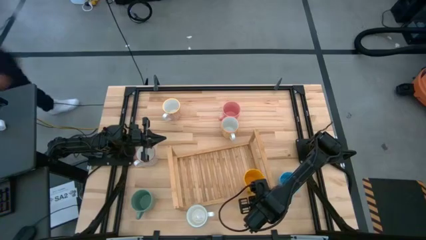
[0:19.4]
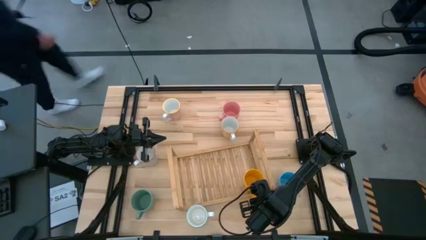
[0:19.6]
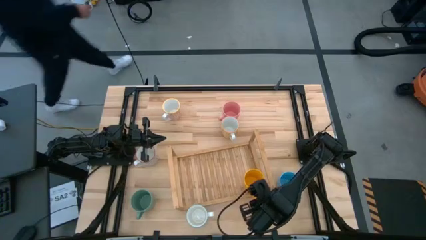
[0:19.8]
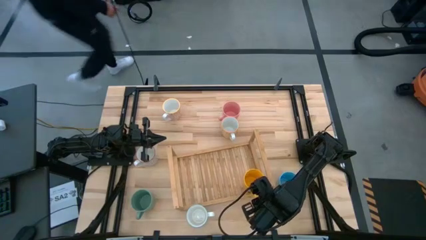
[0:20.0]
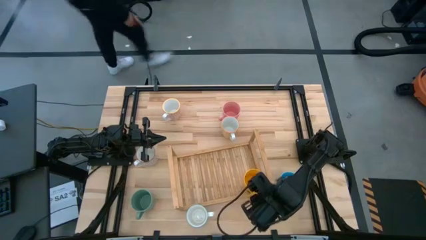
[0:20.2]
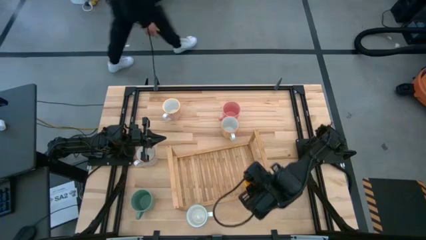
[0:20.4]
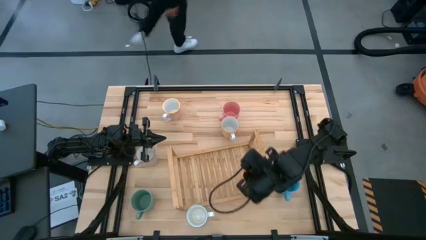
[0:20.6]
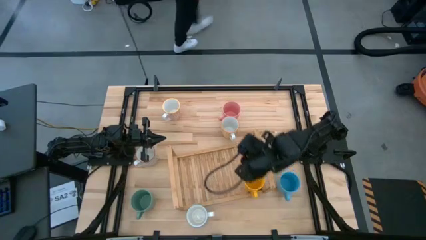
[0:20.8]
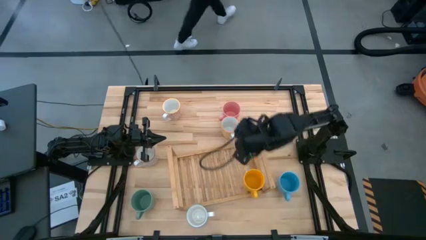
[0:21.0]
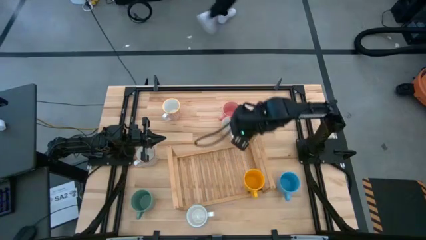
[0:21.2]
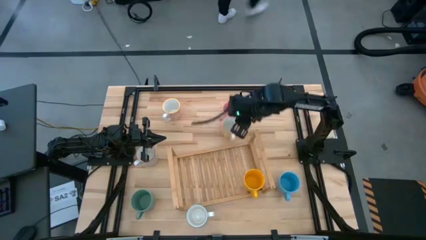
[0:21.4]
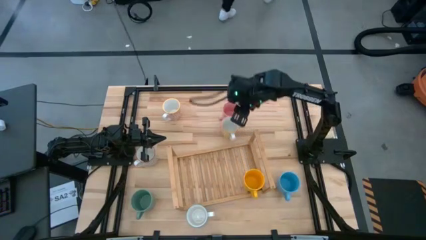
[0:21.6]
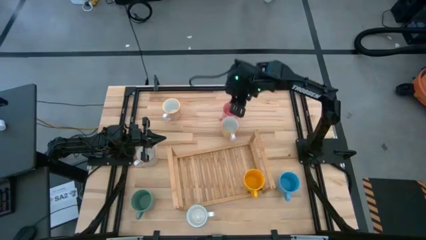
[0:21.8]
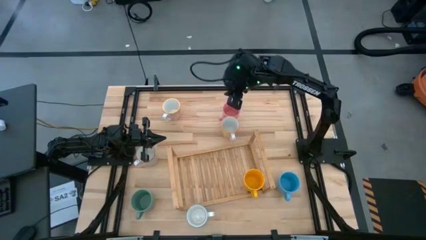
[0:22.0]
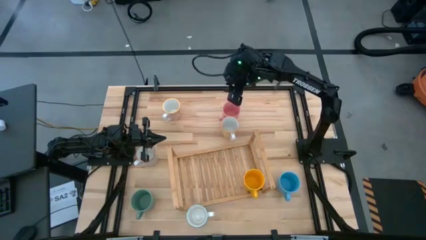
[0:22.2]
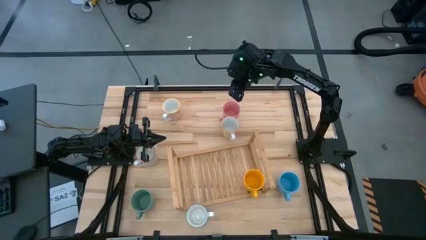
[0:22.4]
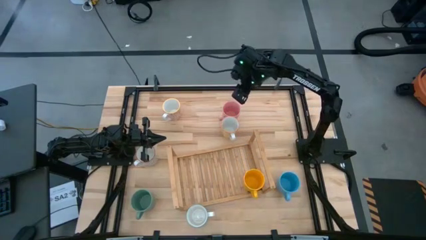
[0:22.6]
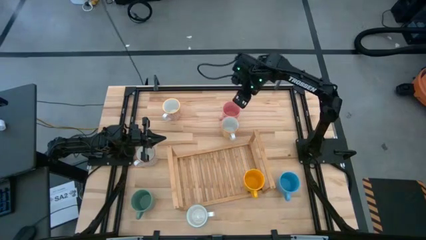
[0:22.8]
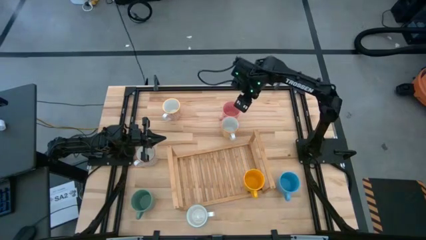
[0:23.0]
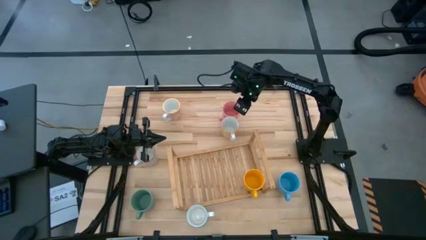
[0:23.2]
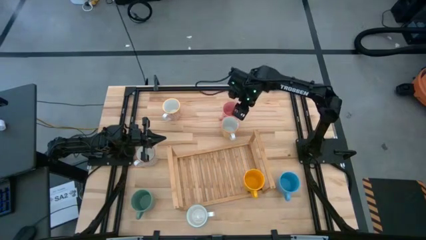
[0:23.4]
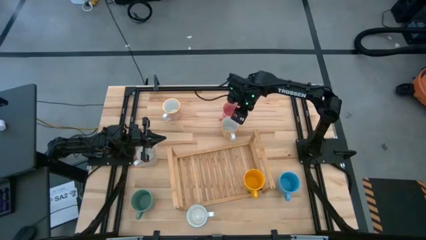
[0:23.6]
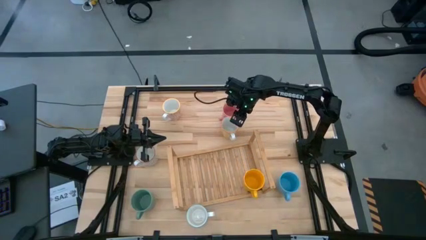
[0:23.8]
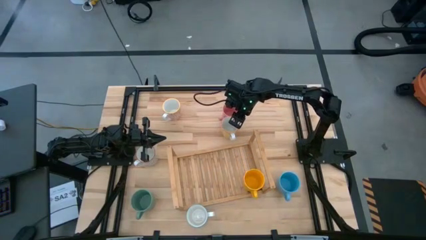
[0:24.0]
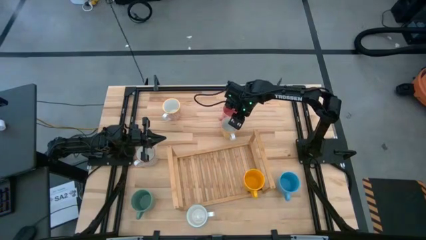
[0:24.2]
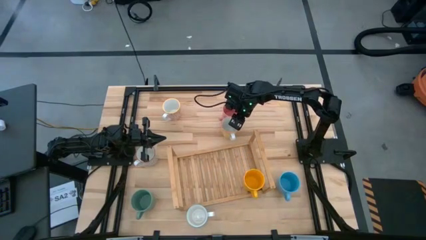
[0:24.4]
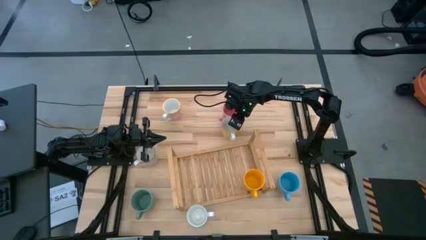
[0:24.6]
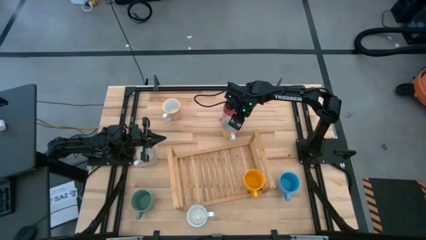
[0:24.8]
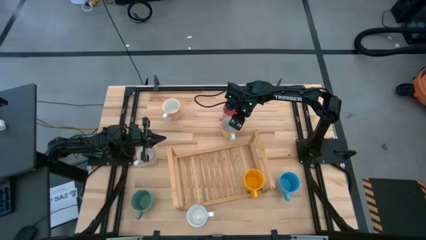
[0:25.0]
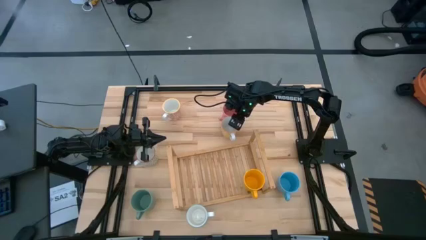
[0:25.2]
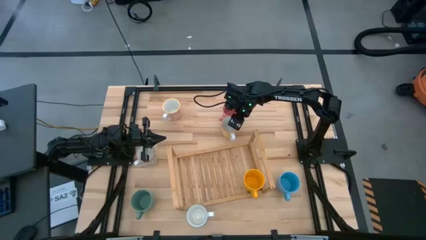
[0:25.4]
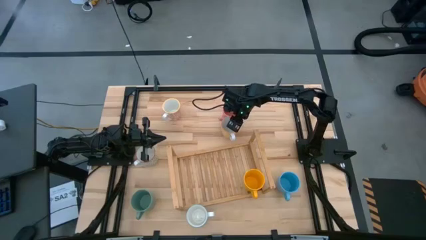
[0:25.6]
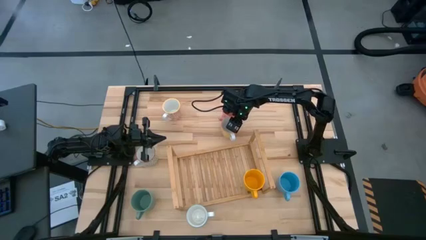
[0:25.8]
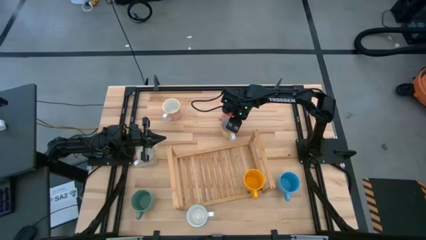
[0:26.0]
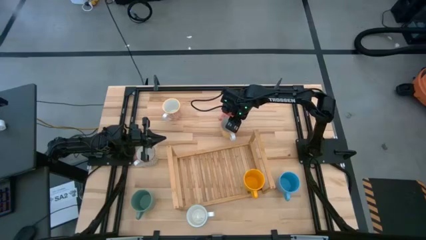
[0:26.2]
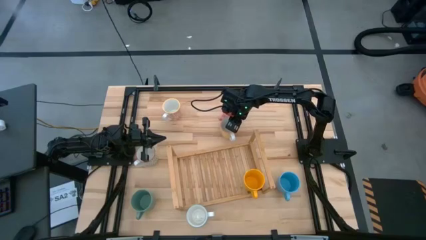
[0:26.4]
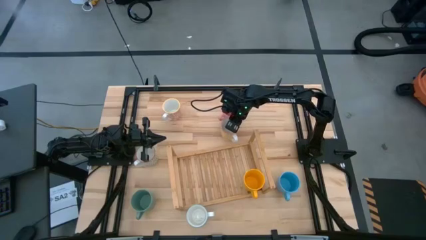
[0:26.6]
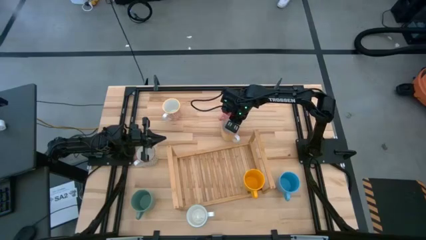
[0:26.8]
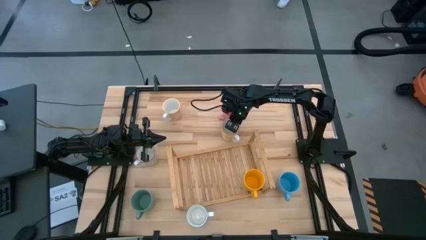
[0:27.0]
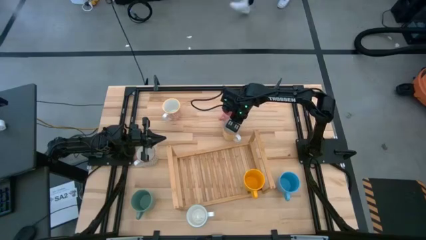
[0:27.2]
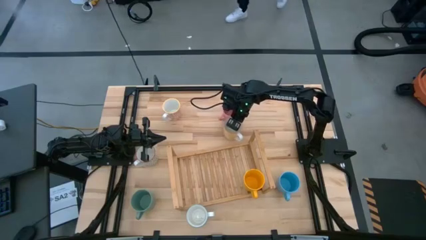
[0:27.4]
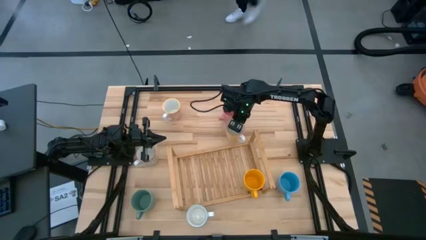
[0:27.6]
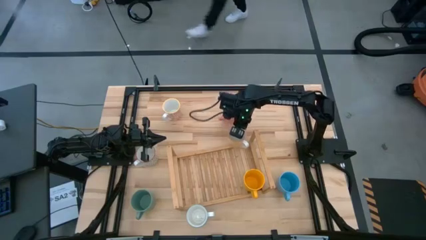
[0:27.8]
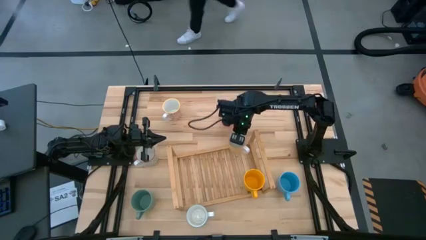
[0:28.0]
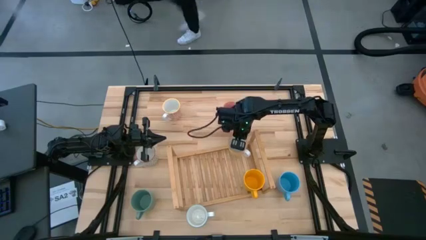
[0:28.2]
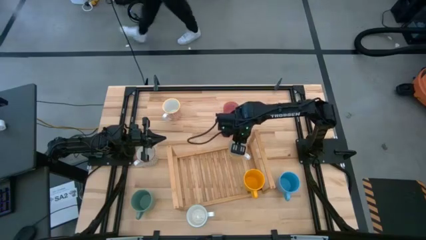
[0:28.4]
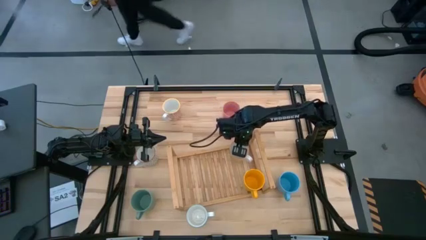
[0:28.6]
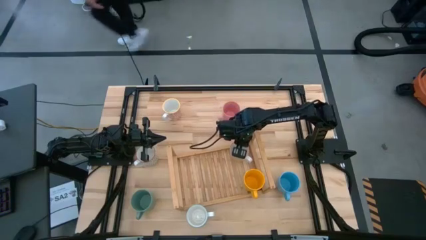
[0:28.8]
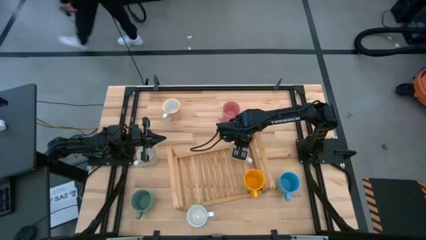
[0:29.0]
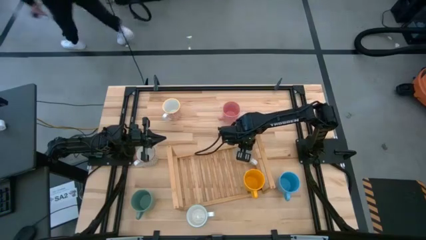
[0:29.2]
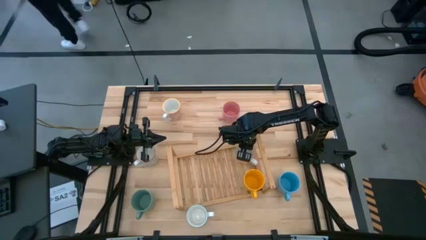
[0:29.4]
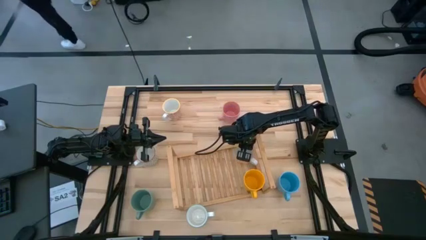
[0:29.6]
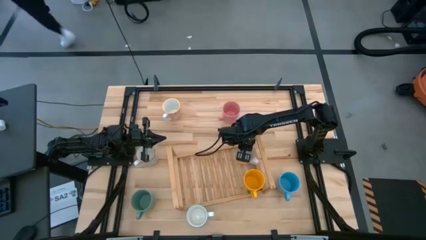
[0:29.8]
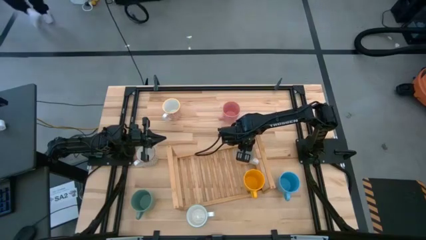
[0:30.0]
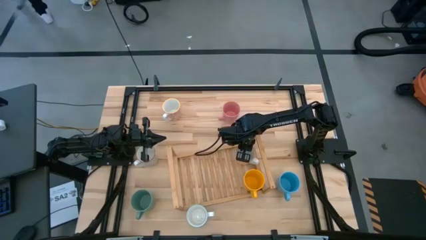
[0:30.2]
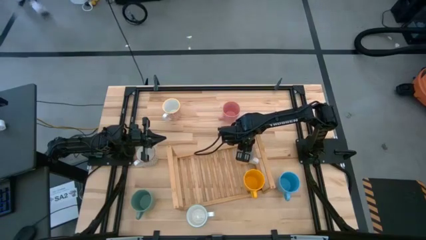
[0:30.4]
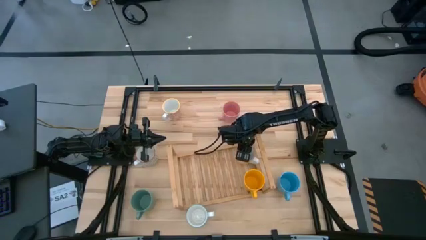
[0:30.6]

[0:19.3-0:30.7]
Task: Place coffee mugs
Put the white-yellow patterned mug on the shelf

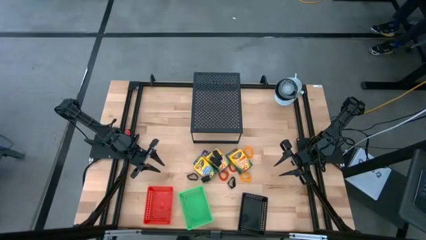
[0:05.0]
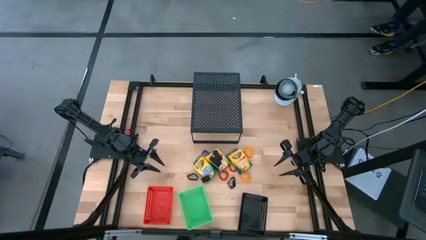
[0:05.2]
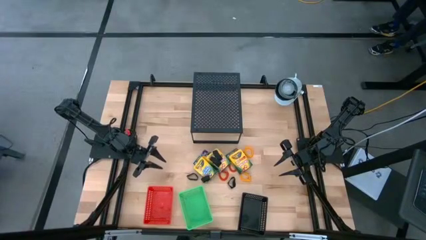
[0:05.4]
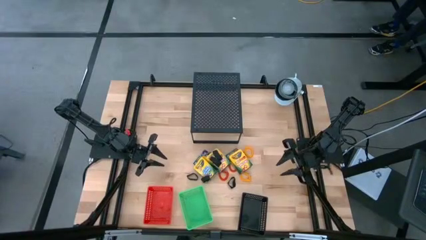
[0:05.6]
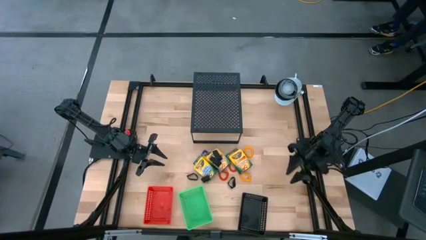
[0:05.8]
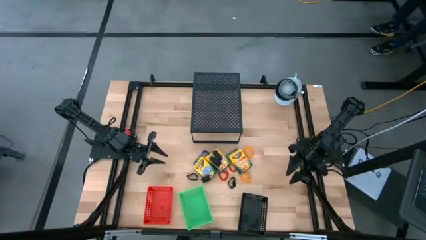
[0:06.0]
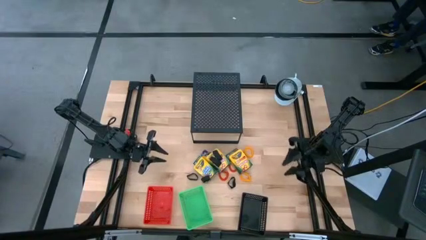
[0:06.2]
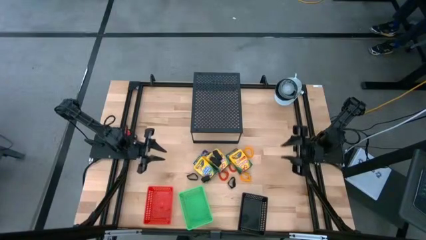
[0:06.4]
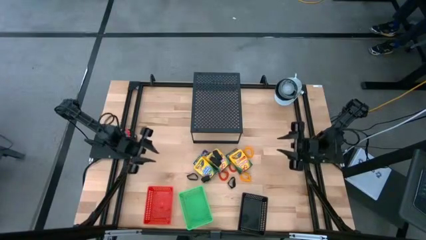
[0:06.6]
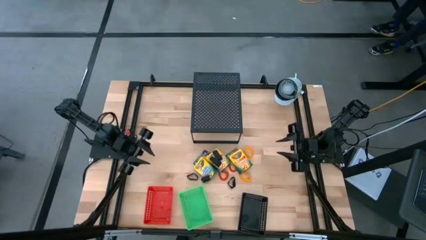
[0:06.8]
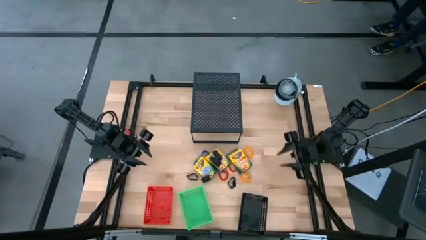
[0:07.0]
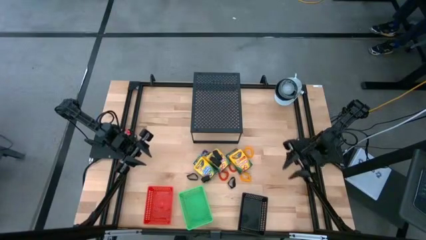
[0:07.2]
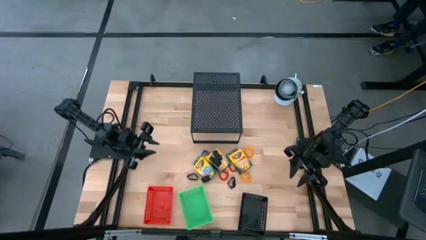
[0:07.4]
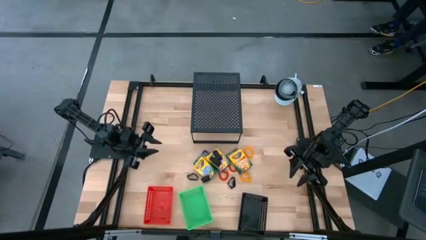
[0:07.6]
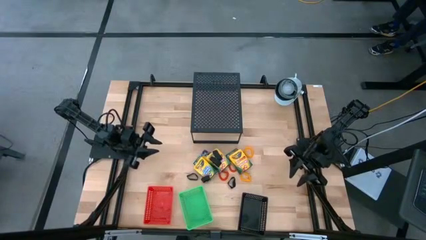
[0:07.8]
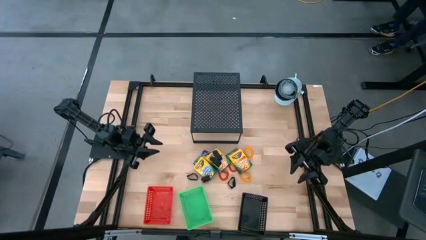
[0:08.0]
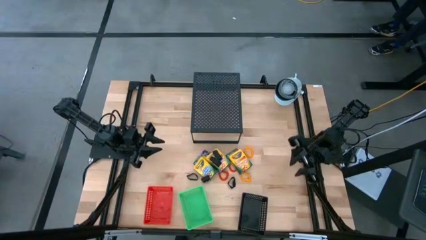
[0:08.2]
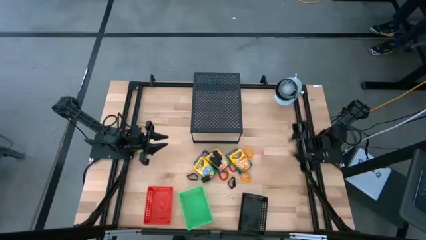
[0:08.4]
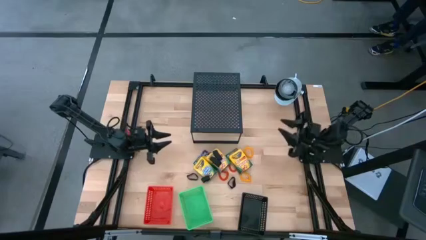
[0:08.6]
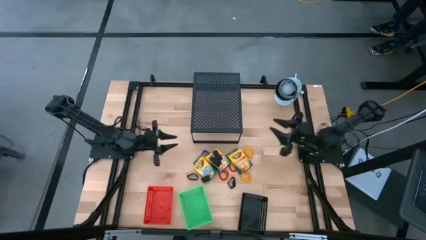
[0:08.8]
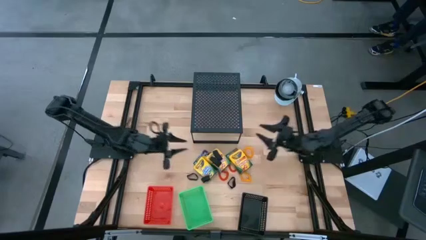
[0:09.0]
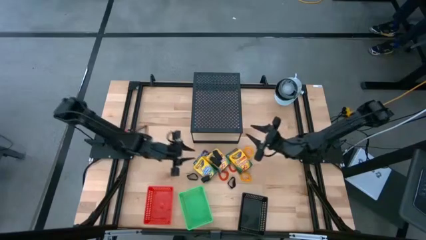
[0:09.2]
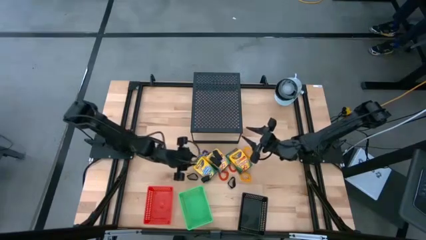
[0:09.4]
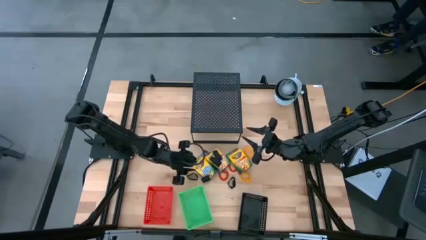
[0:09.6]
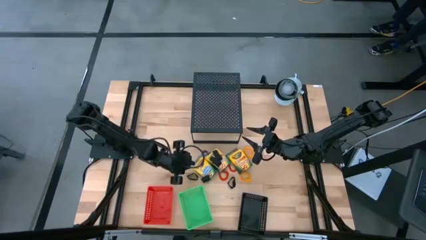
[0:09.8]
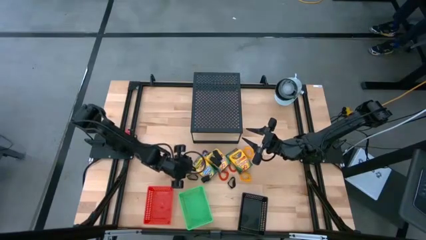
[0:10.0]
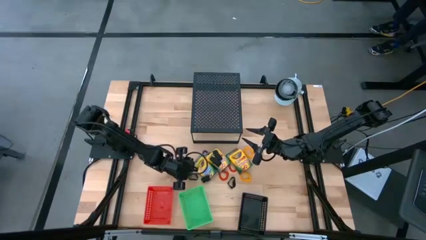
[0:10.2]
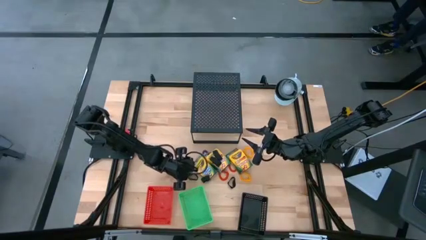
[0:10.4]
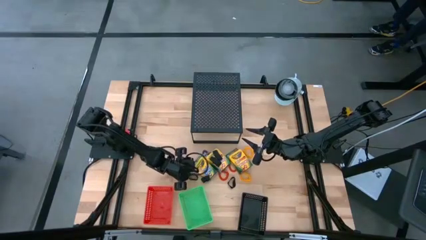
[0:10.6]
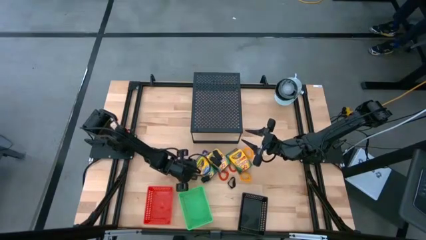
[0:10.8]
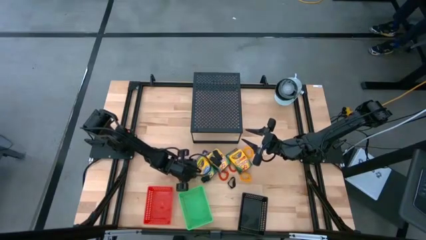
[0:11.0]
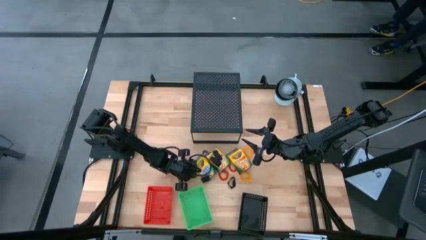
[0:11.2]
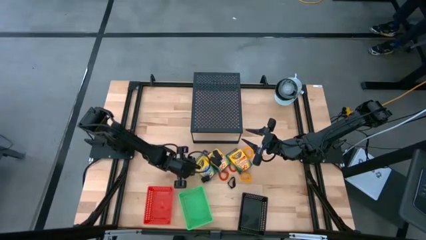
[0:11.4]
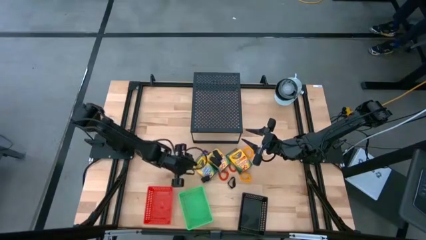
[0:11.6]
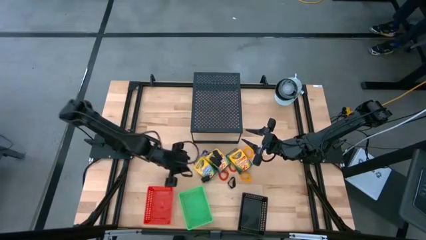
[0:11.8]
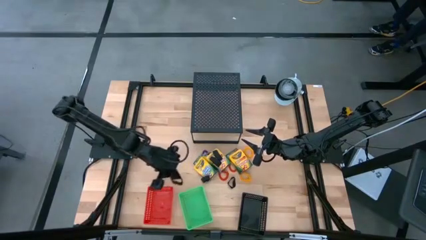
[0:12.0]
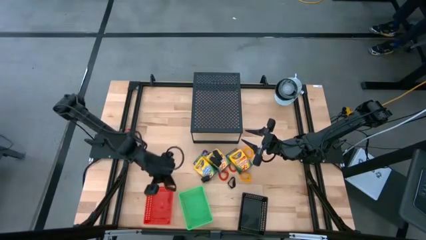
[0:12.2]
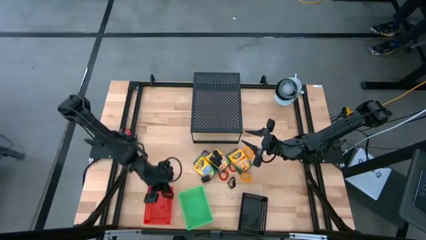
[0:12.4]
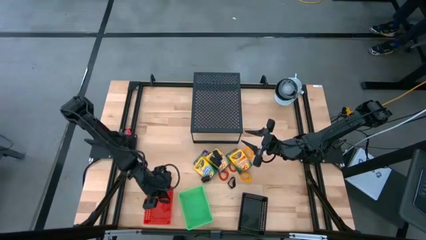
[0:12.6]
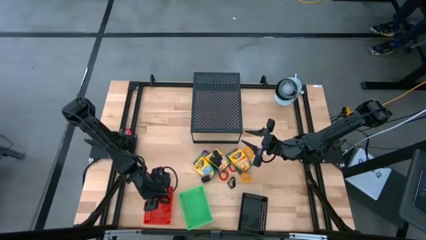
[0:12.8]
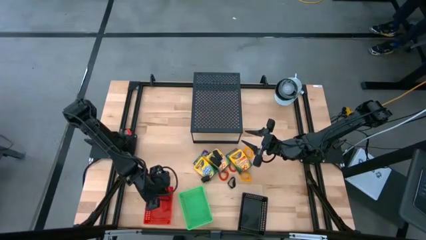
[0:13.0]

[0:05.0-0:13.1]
Task: Pick & Place Office Desk Supplies
Put the black rubberband into the red bin
